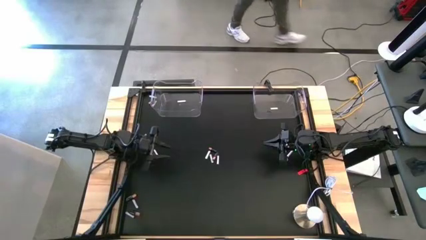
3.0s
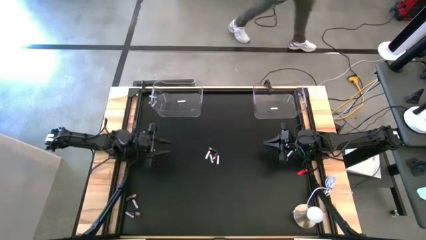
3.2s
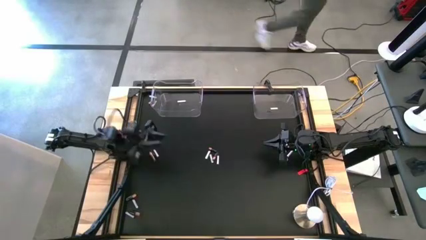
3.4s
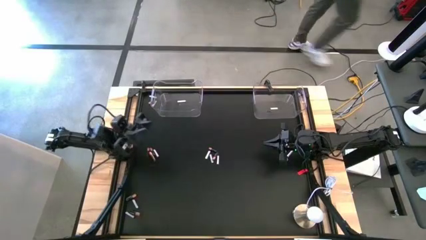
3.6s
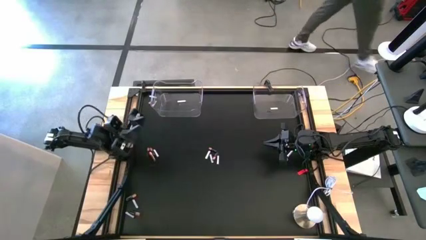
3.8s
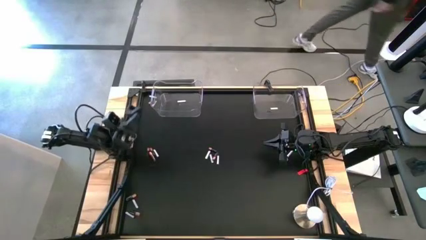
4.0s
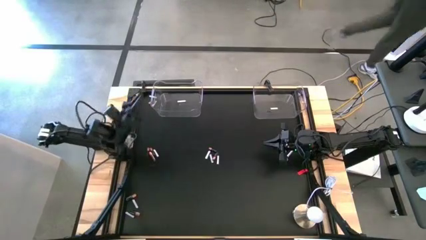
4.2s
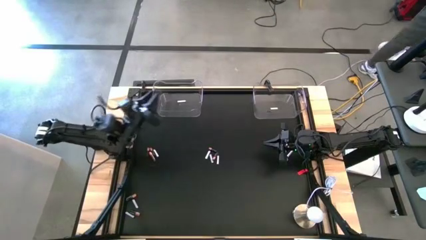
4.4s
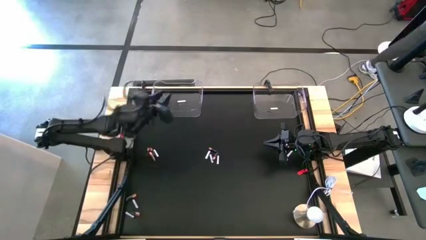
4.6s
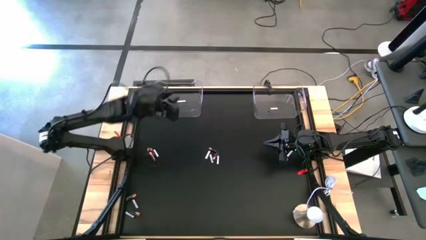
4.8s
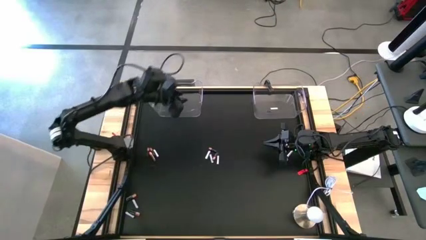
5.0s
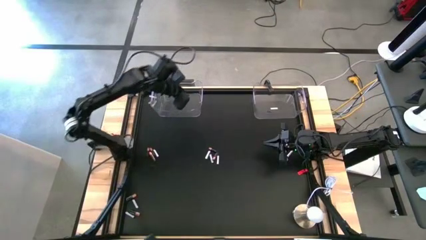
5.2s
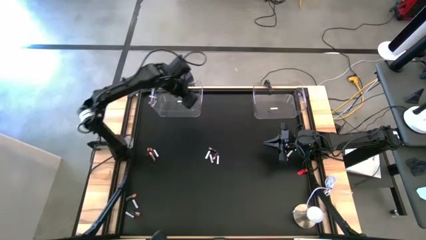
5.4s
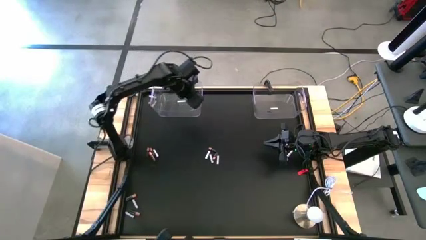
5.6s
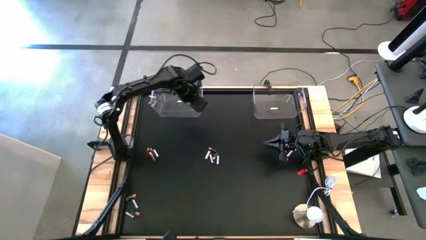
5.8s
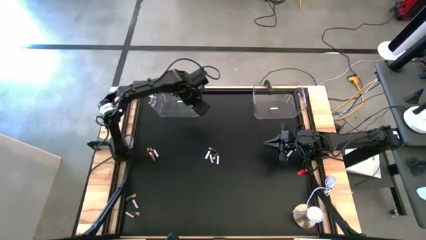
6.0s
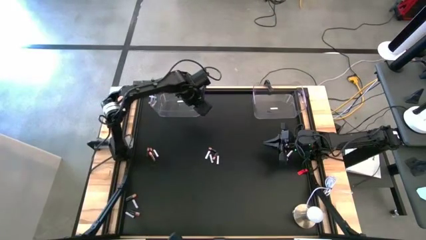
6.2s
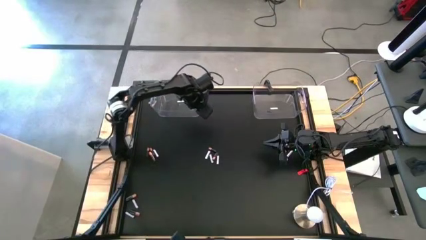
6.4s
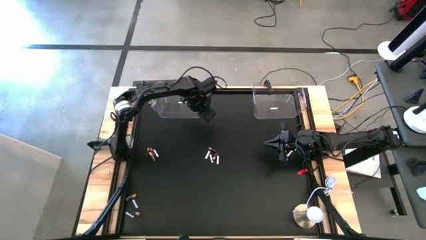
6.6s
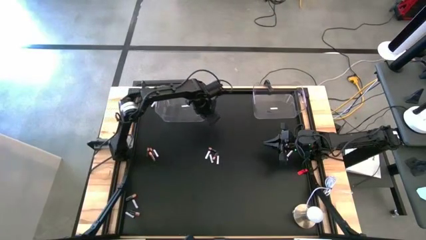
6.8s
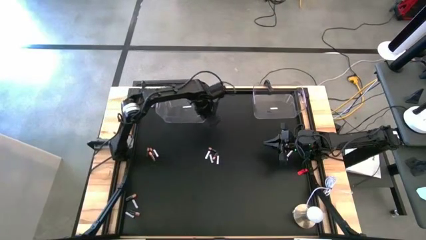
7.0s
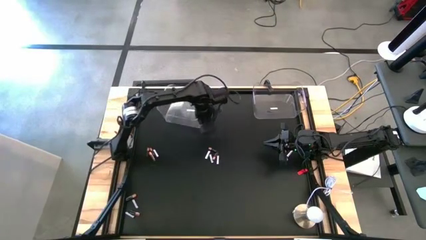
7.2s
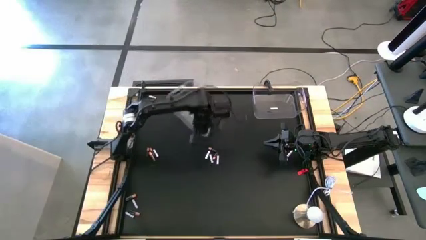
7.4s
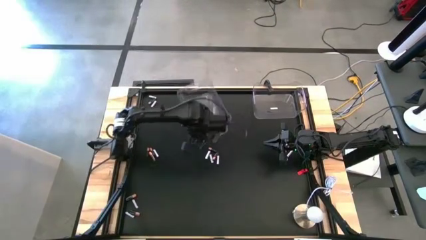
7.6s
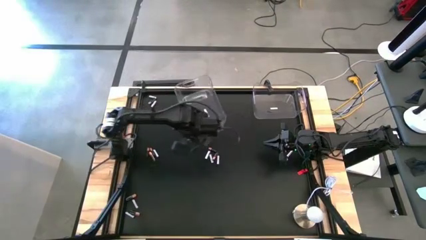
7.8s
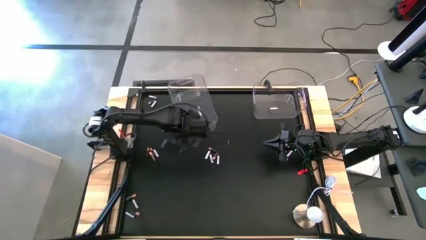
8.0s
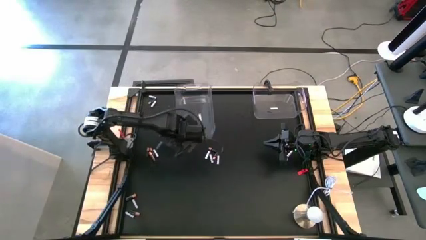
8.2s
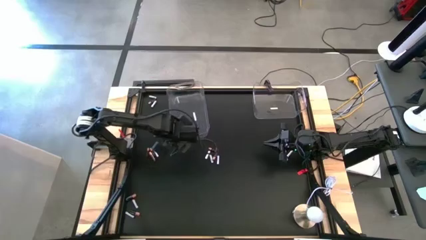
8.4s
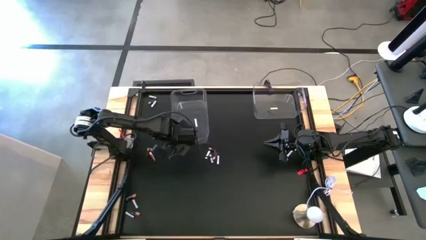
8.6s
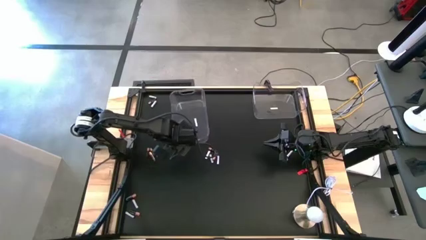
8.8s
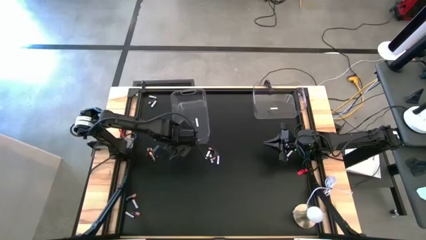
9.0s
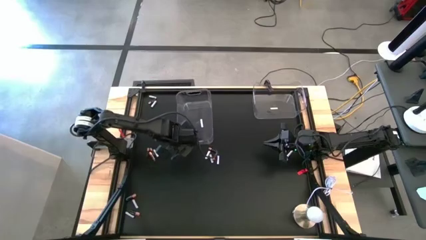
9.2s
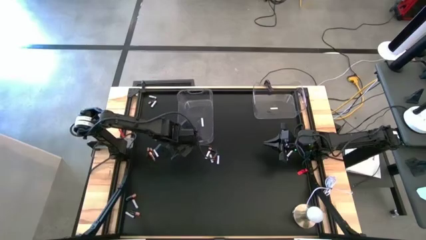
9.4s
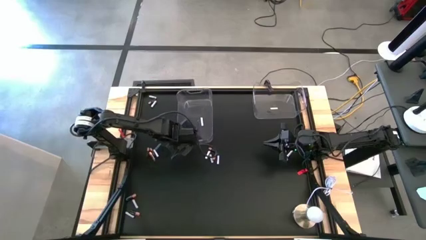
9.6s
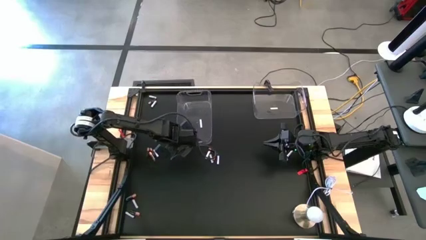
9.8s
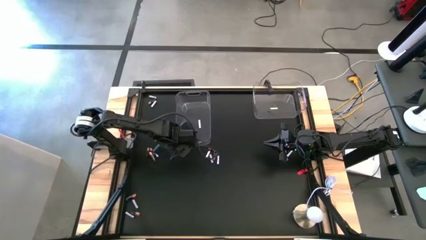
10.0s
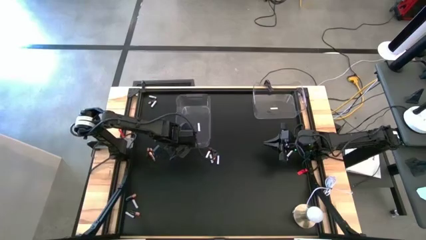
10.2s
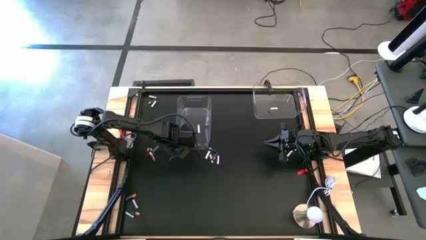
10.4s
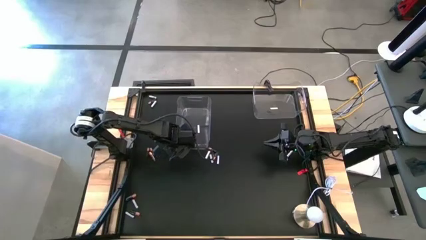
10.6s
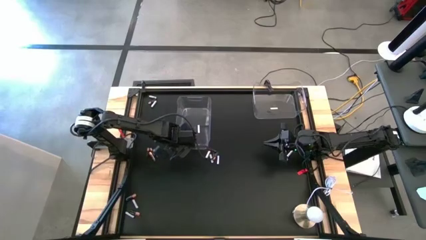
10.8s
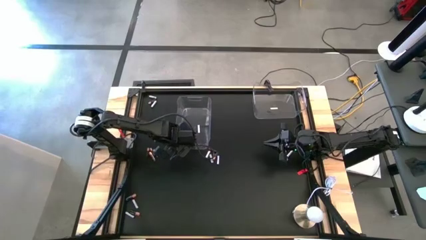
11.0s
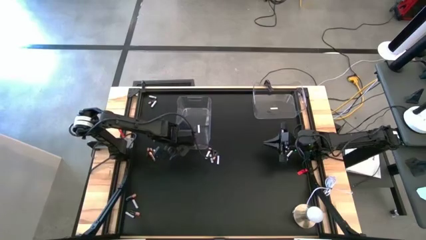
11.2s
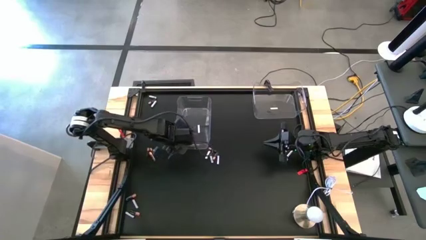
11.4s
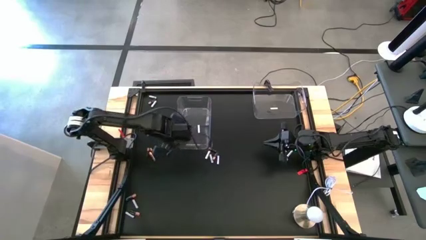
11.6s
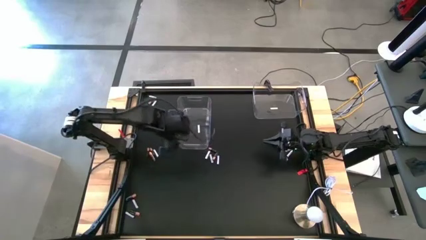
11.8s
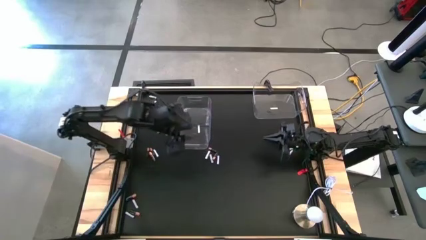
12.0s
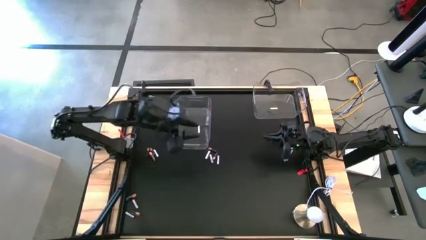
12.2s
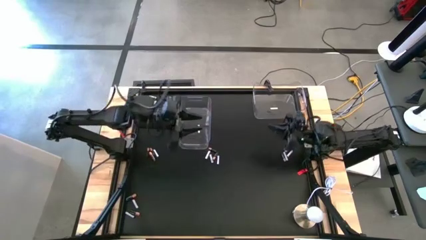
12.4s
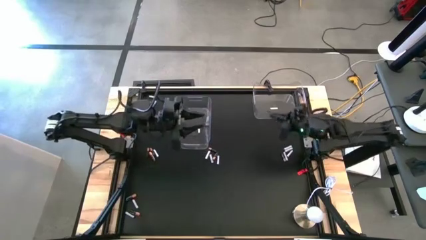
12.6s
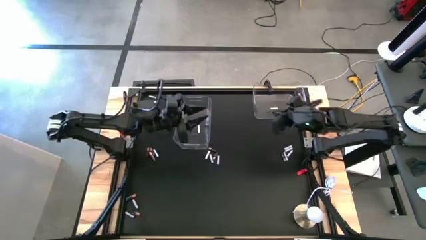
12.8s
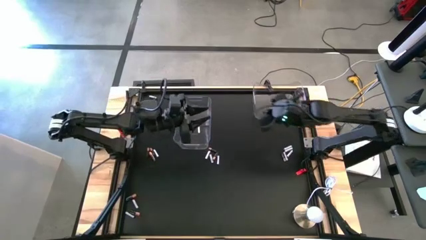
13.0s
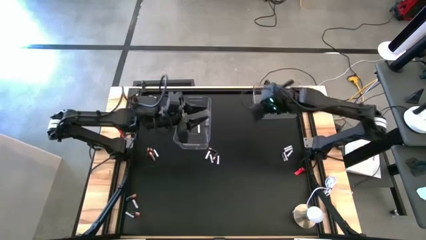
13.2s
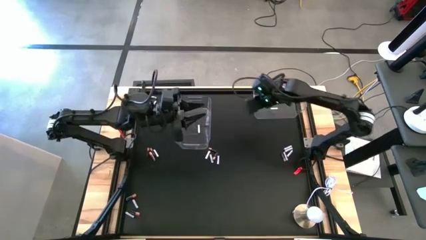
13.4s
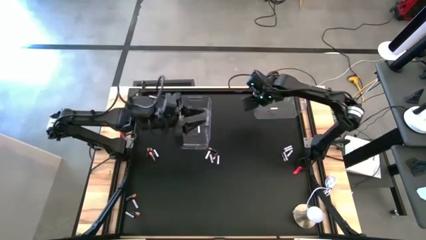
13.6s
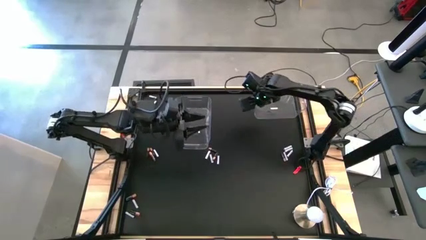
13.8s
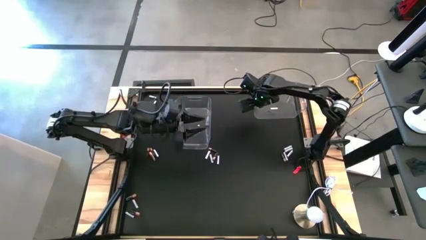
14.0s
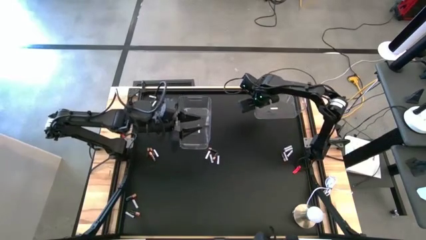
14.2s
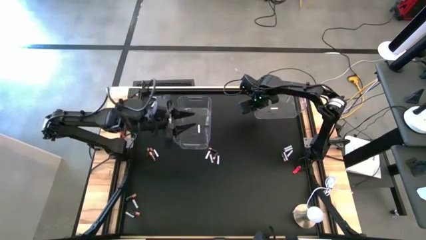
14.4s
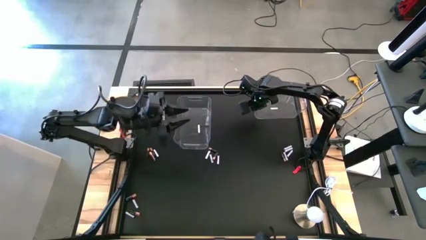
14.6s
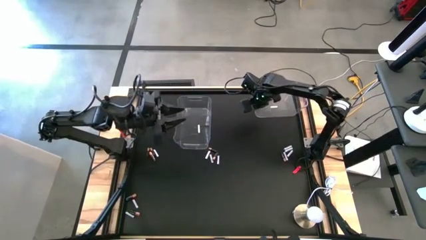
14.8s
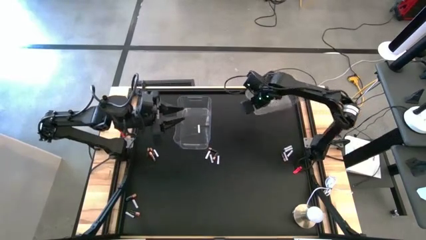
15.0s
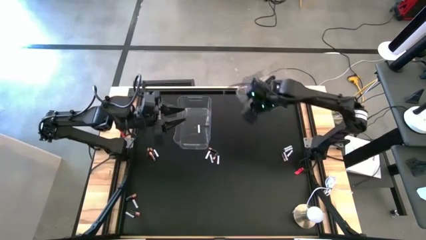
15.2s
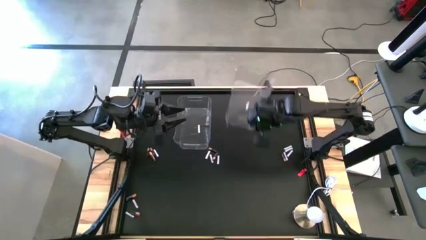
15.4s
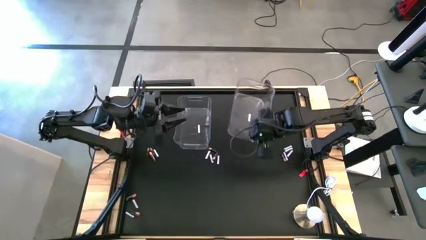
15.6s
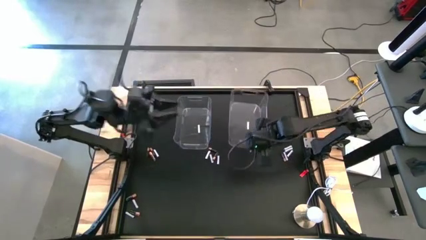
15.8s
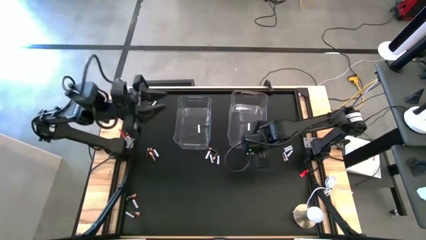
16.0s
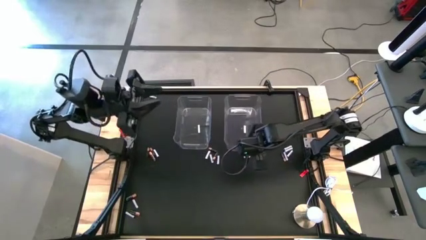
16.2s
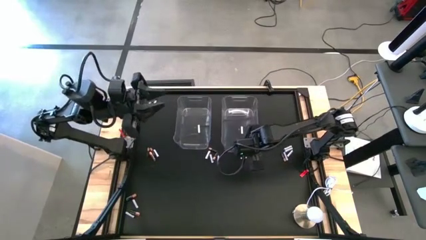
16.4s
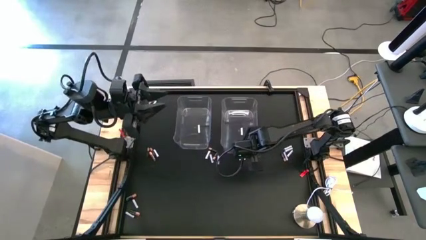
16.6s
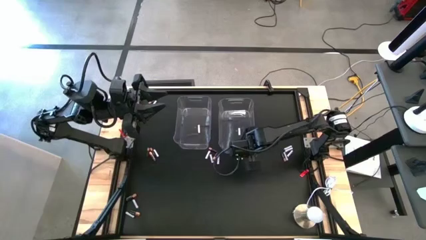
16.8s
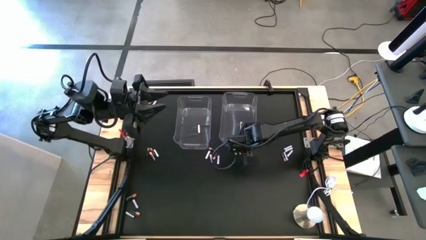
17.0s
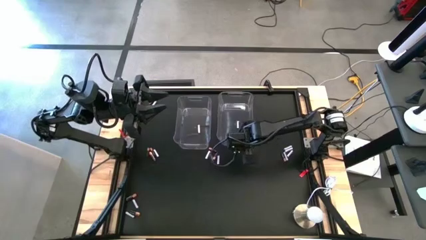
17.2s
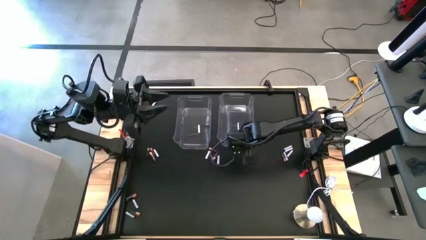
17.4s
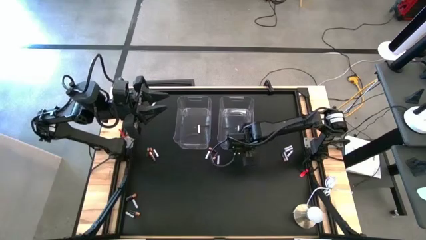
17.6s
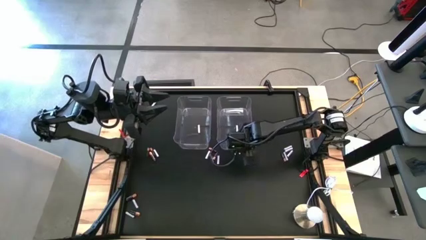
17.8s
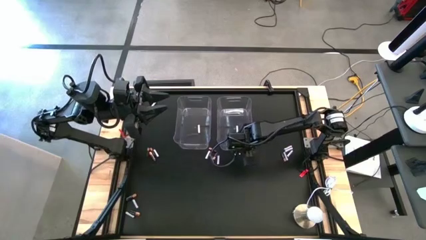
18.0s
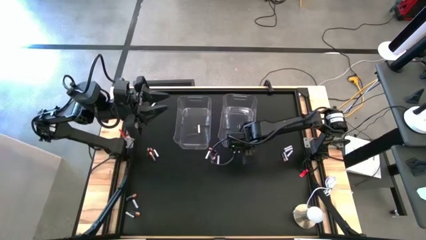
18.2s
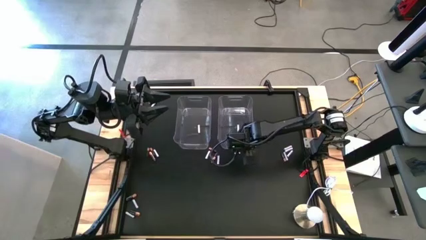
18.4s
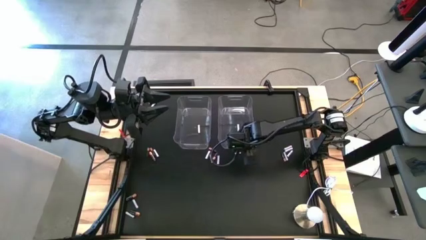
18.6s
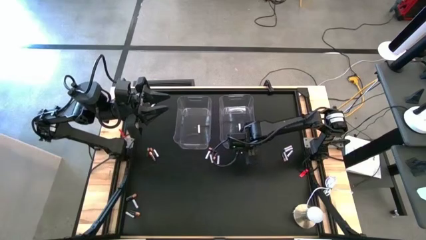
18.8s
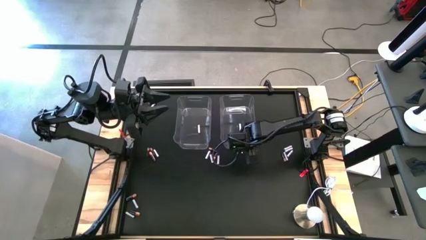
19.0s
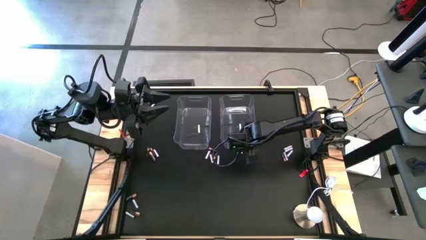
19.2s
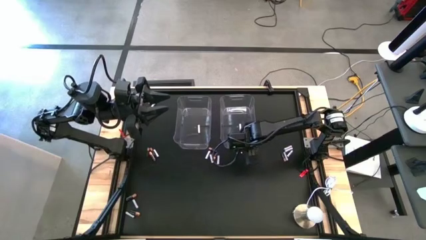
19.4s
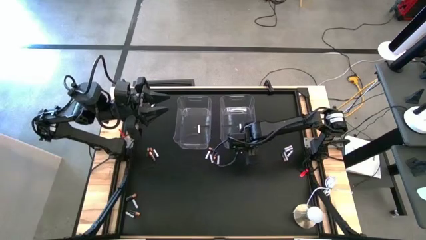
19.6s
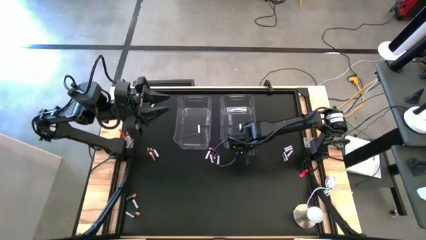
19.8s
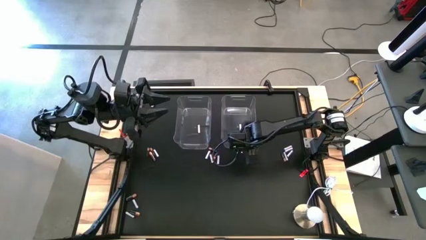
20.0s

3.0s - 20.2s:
Task: Sort batteries
Adjust the bins
